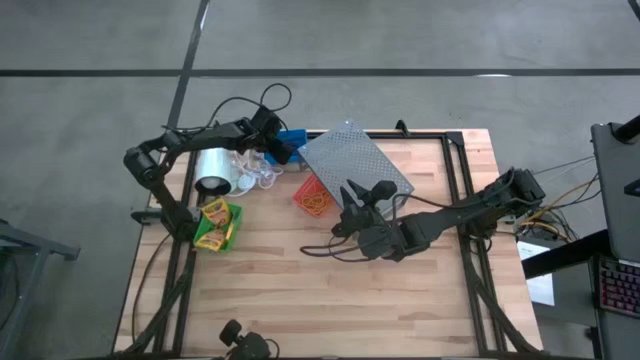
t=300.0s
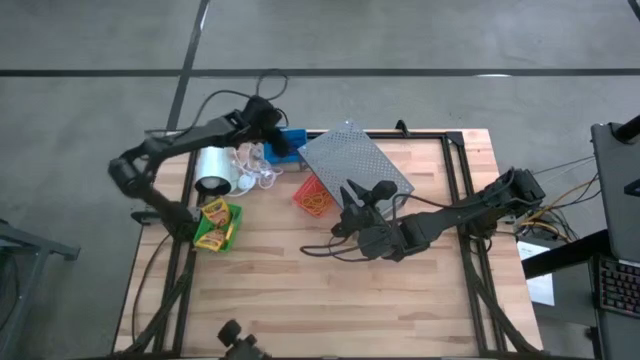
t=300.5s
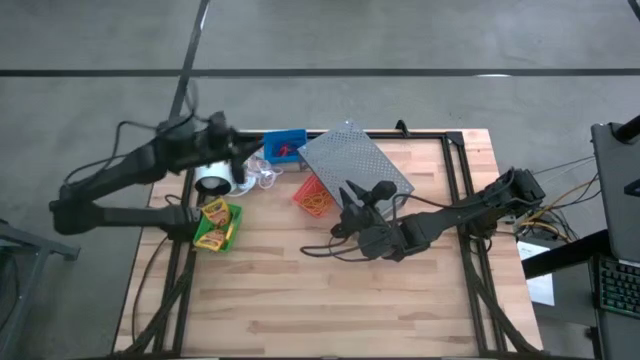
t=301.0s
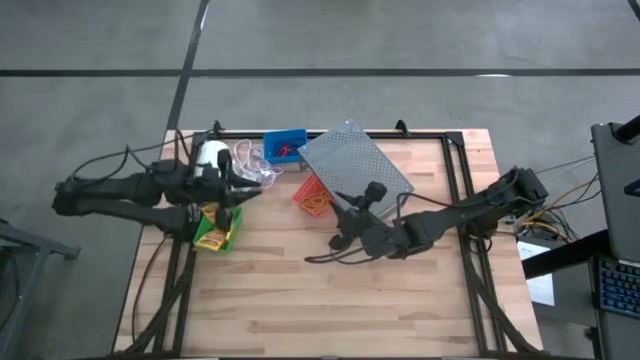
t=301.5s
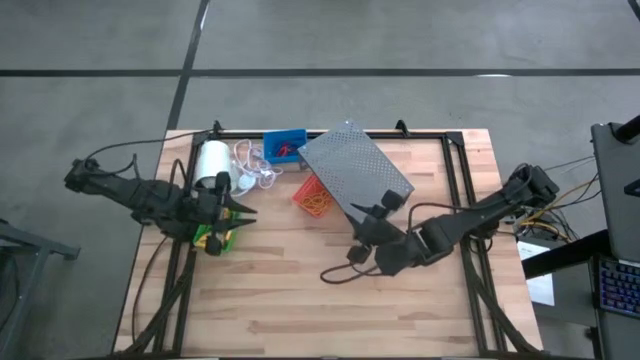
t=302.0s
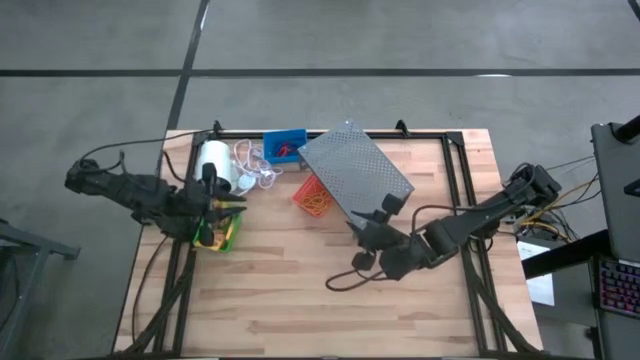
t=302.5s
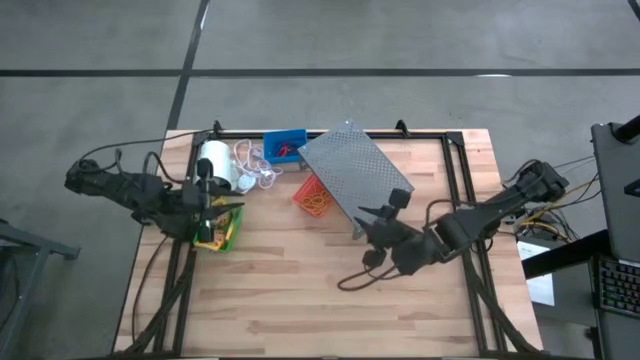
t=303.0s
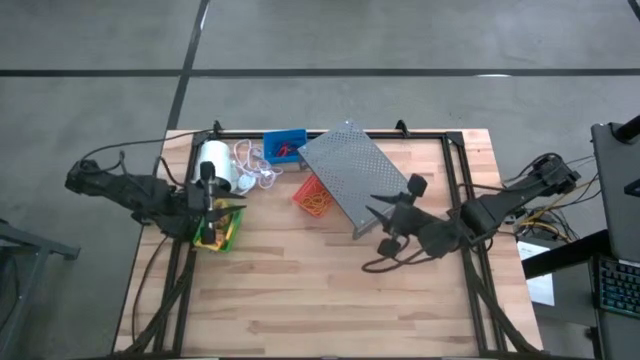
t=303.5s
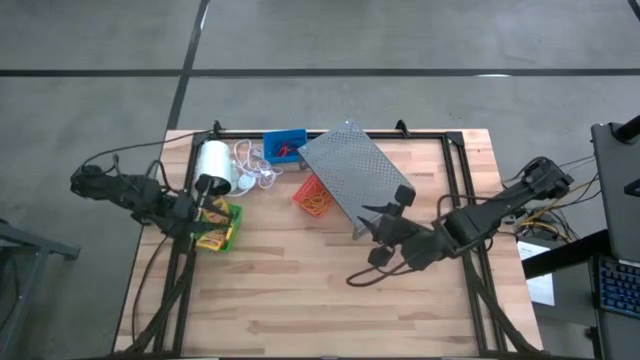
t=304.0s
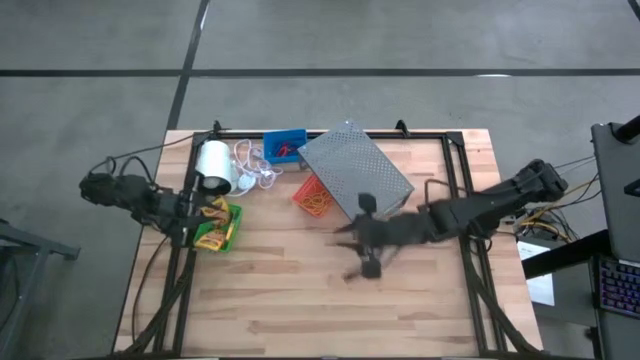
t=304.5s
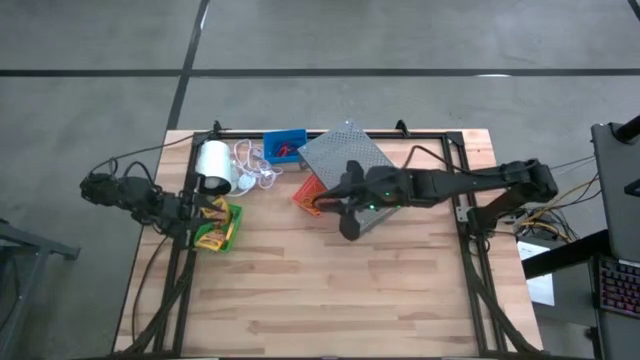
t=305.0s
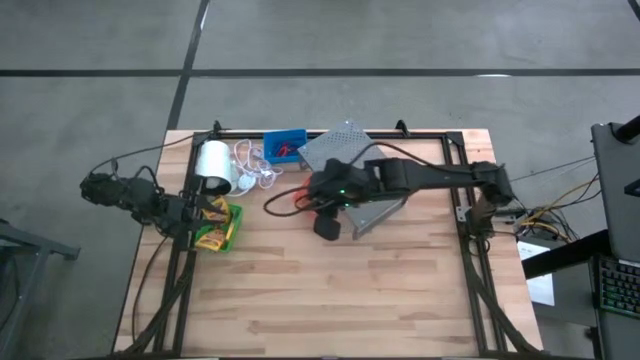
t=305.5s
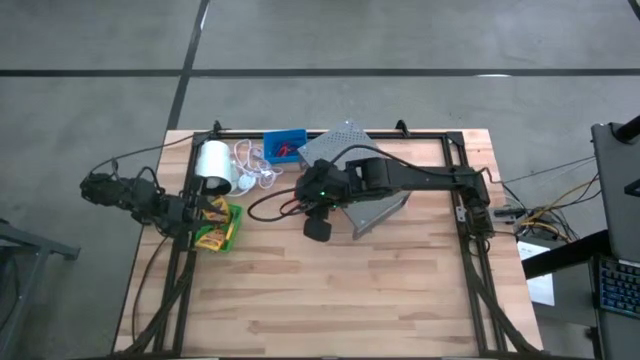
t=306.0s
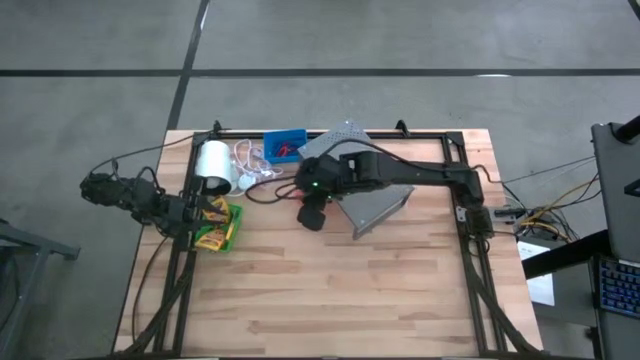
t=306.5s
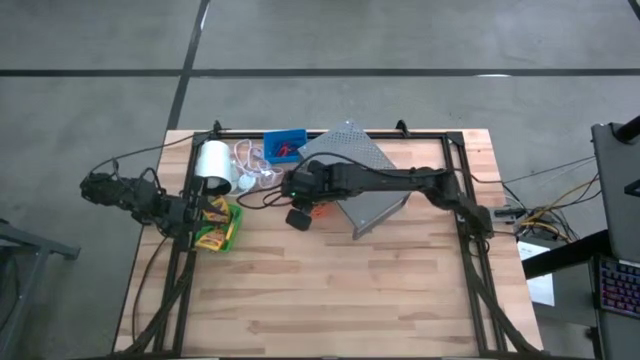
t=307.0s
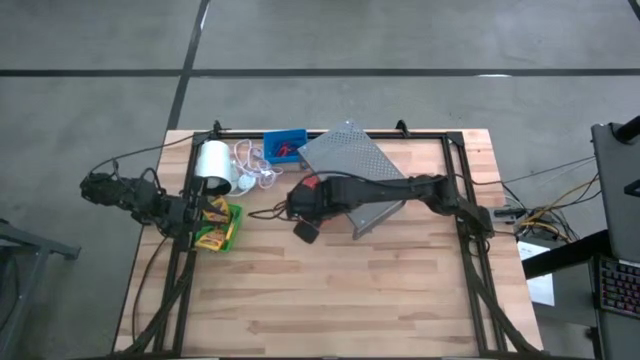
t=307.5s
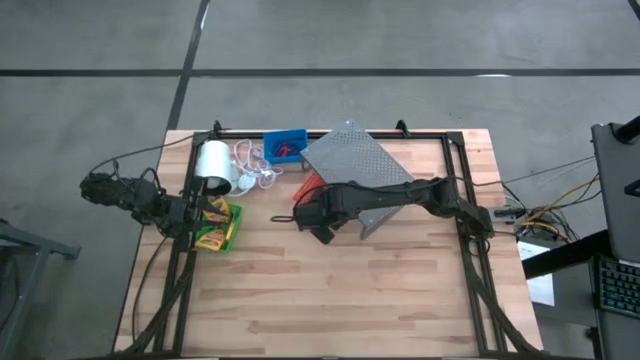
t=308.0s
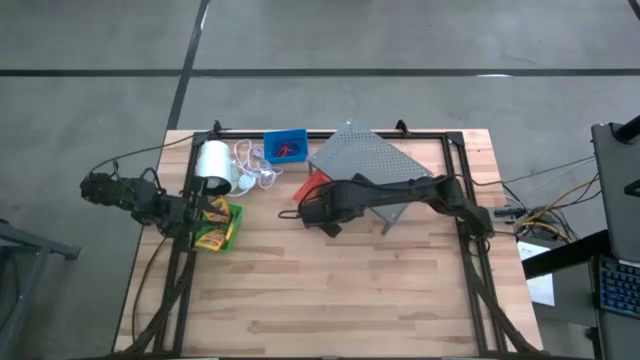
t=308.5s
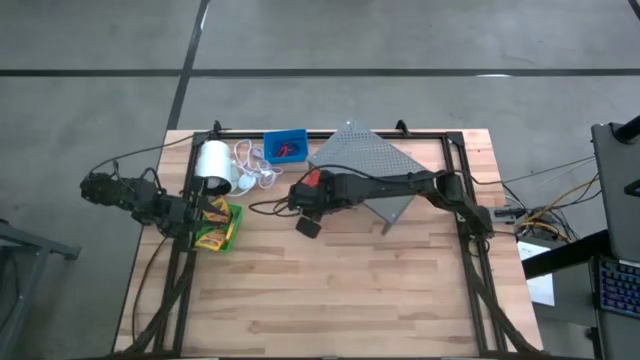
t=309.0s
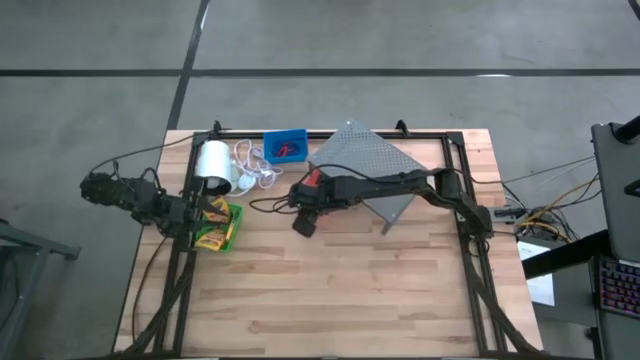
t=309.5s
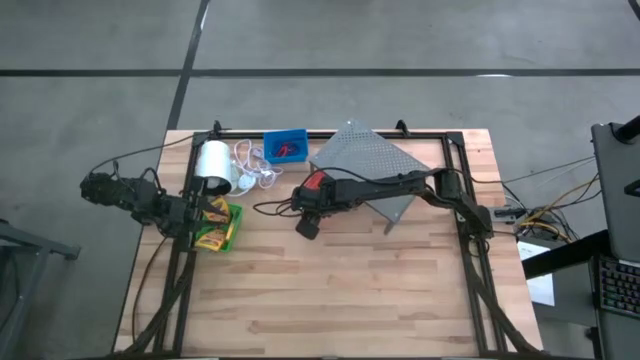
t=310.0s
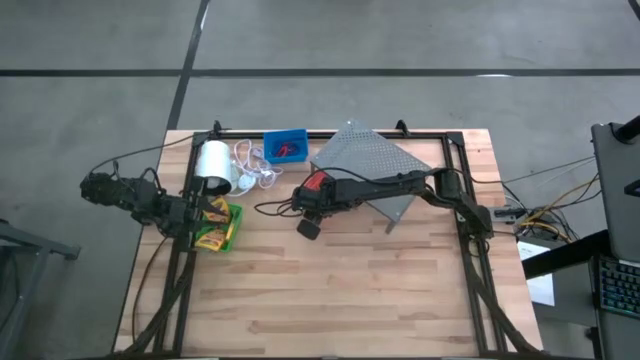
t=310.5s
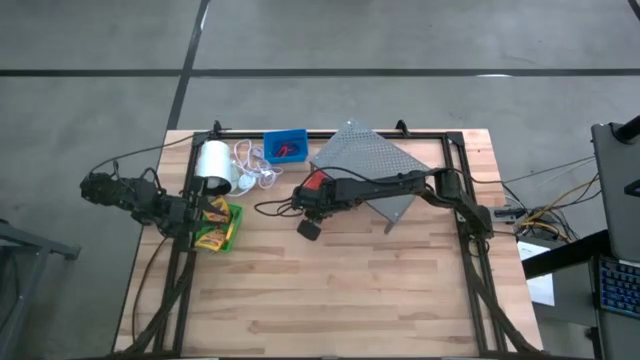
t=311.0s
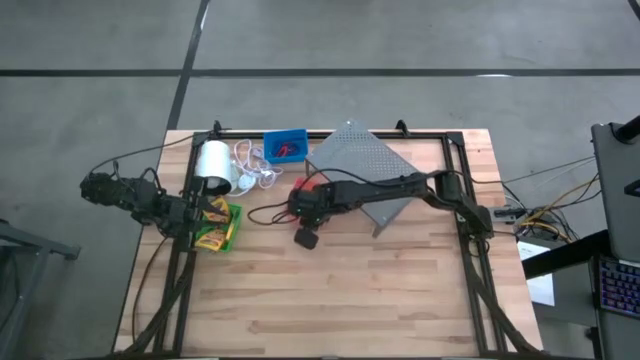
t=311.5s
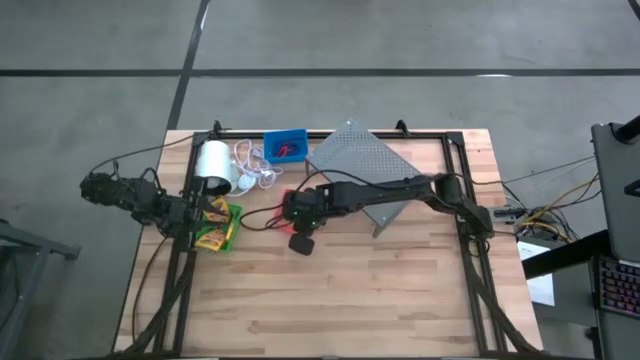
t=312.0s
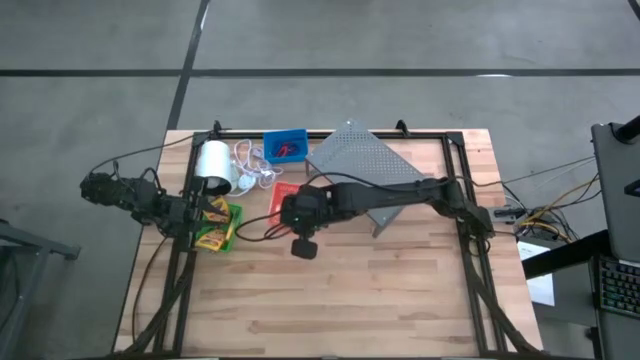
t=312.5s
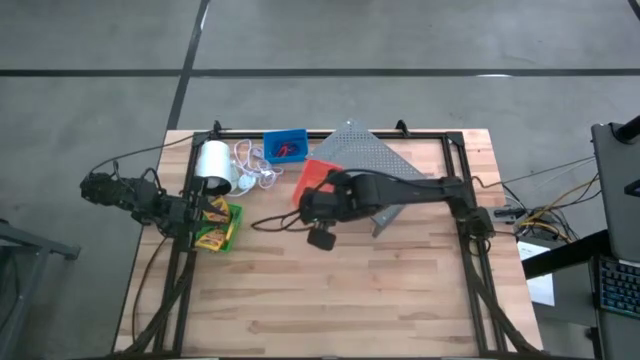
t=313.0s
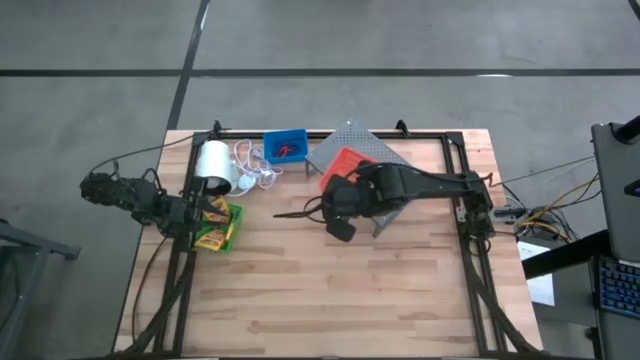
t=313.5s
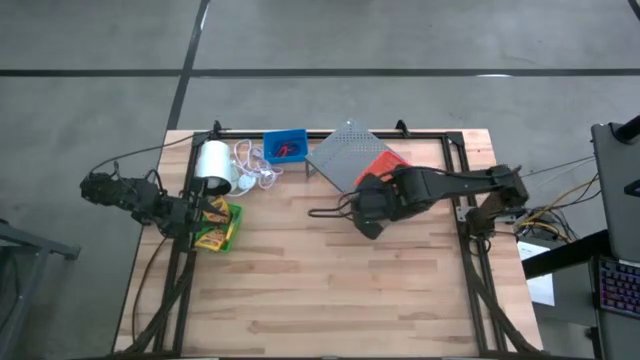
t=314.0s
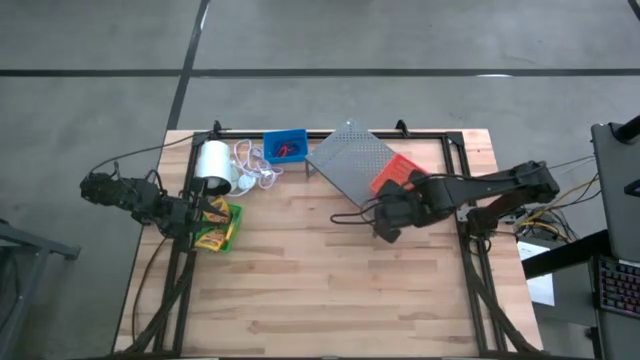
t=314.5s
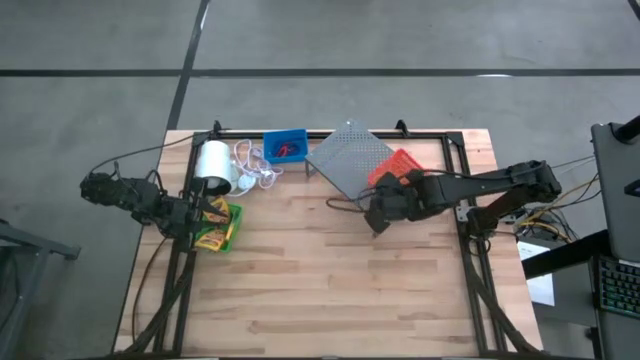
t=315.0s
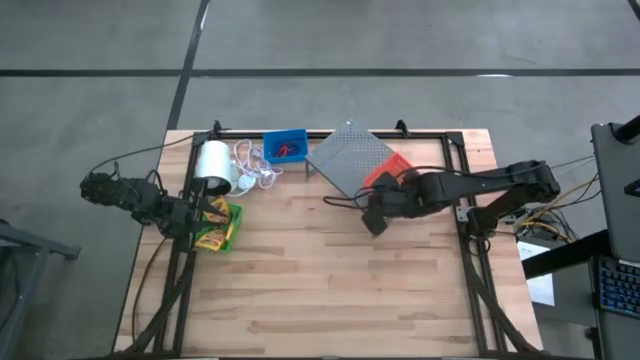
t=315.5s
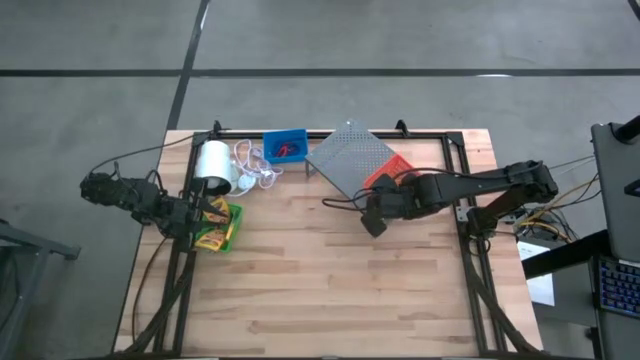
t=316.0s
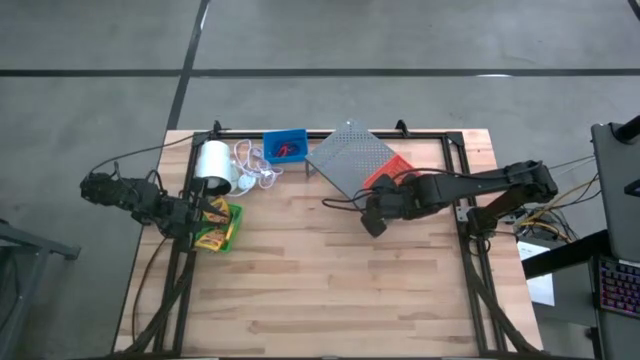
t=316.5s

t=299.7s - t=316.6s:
Task: Pick & Place Office Desk Supplies
Put the orange bin on the shelf

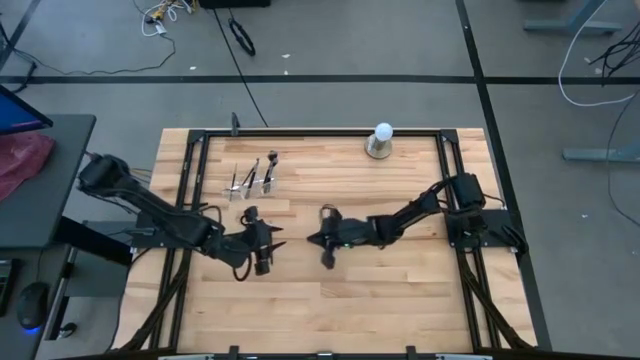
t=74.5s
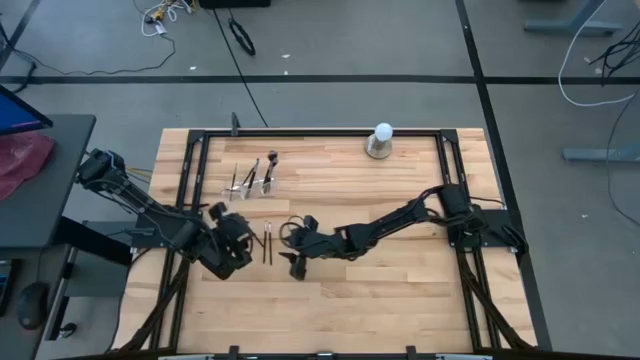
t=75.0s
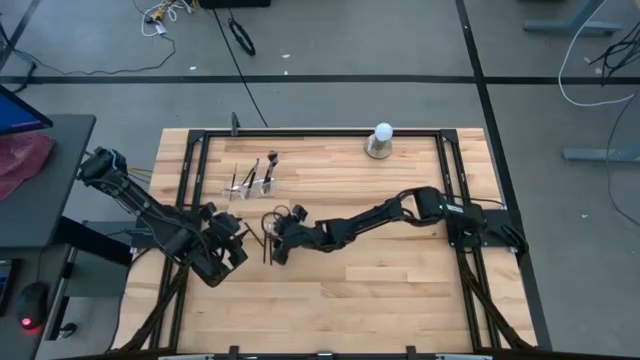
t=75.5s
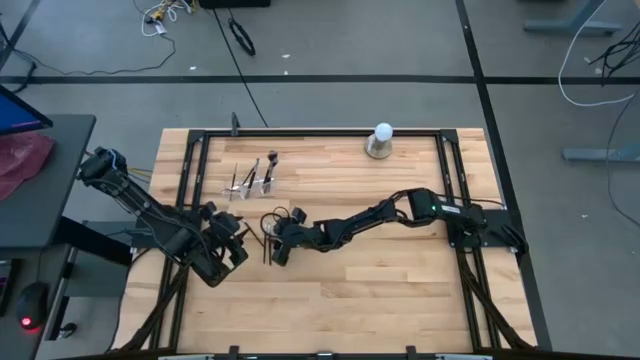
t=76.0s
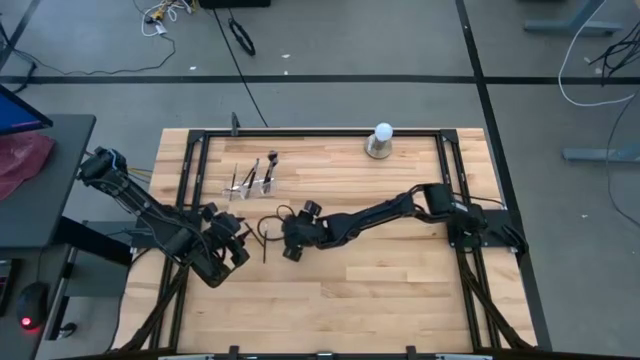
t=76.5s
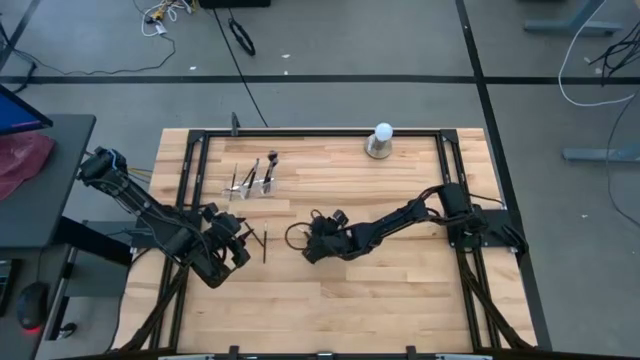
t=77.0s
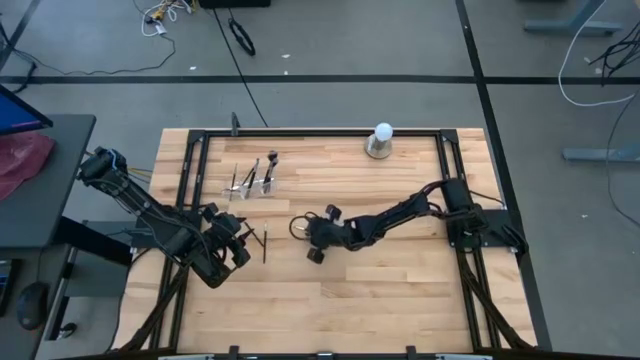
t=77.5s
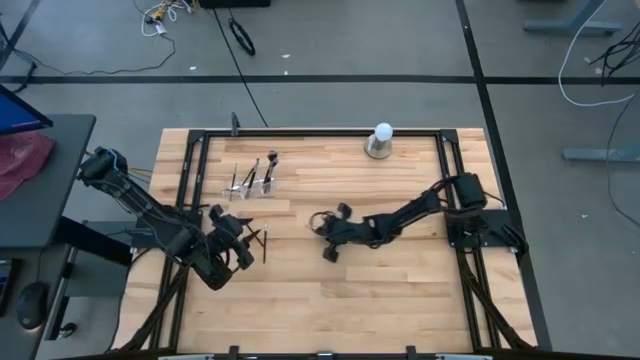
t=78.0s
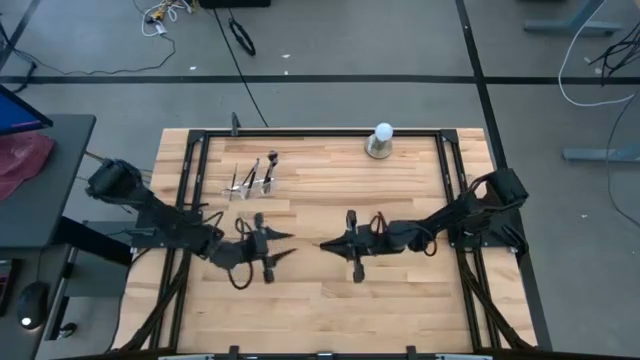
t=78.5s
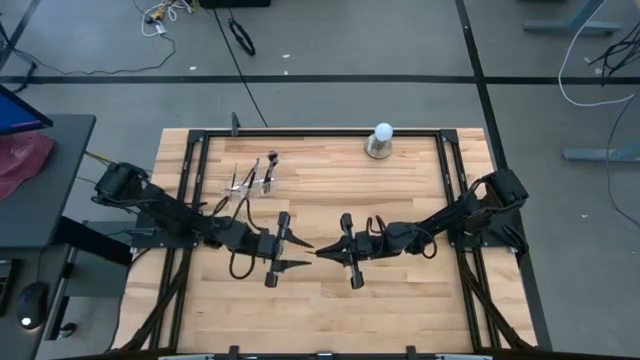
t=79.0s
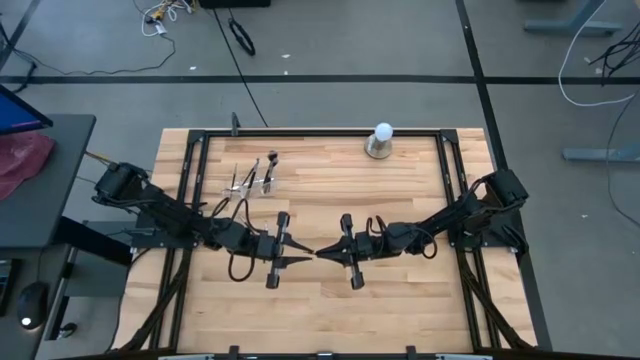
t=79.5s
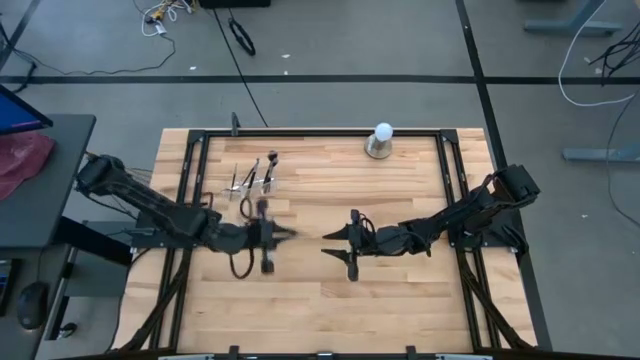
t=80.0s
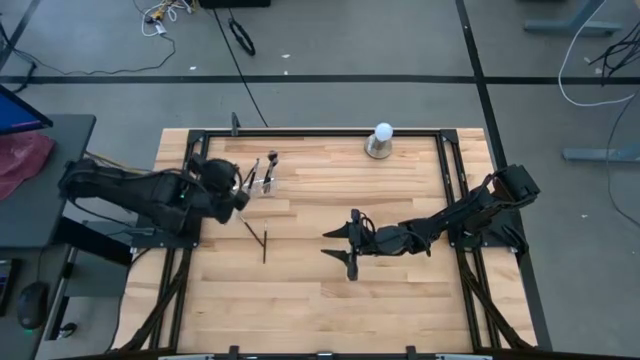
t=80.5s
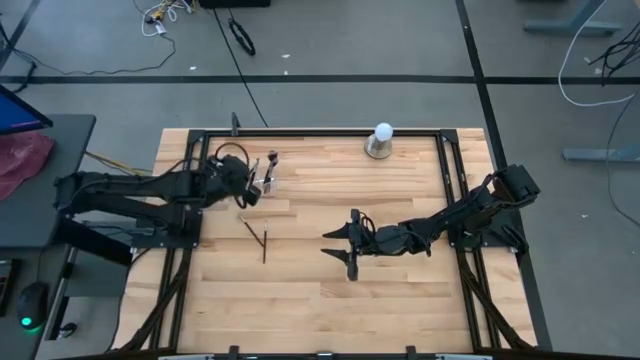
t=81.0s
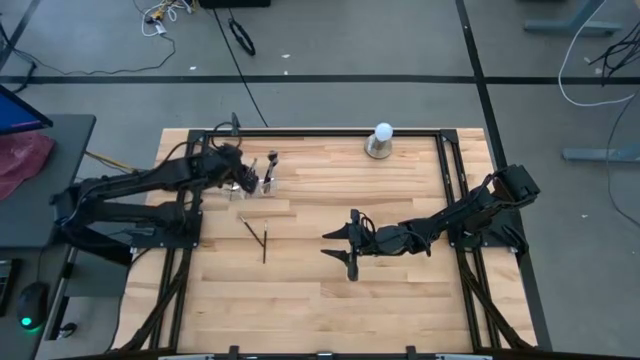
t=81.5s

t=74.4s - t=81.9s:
Task: Put items in baskets/containers
Put the black eyeshadow brush into the middle section of the transparent organizer
